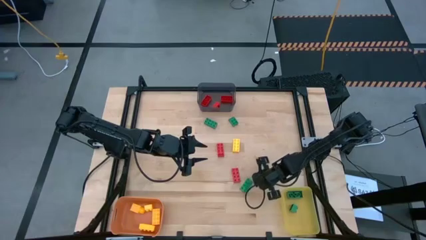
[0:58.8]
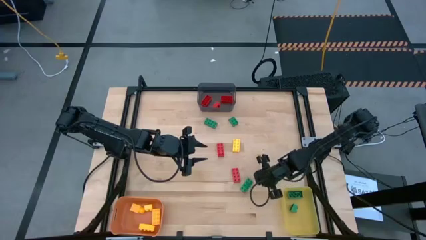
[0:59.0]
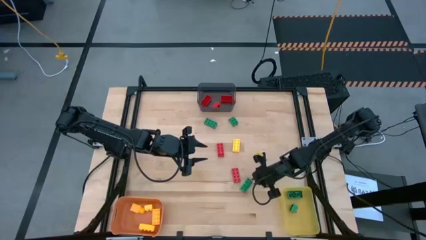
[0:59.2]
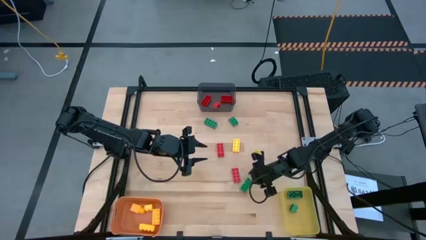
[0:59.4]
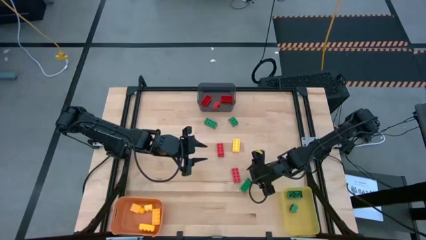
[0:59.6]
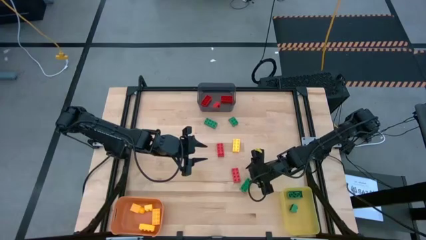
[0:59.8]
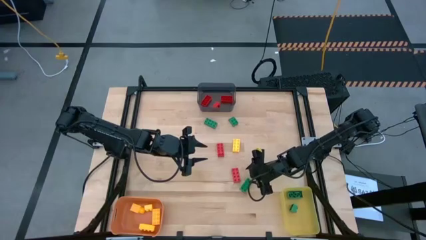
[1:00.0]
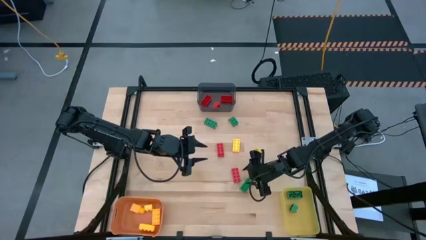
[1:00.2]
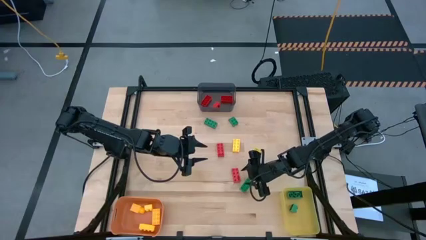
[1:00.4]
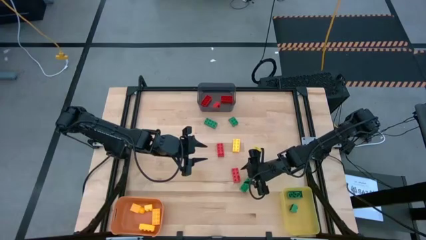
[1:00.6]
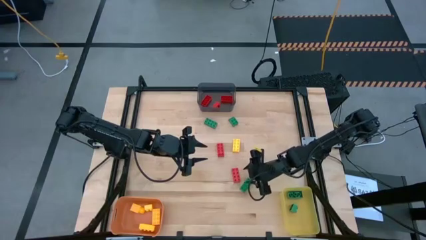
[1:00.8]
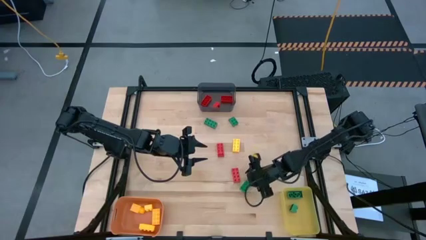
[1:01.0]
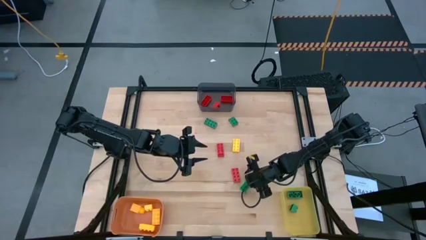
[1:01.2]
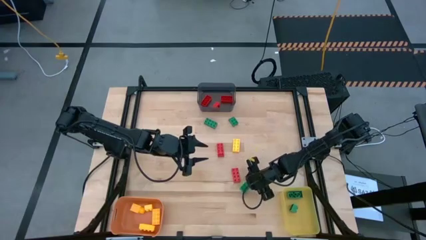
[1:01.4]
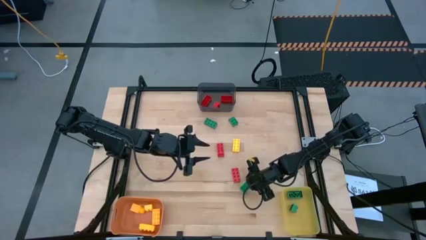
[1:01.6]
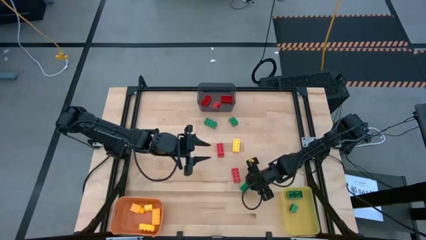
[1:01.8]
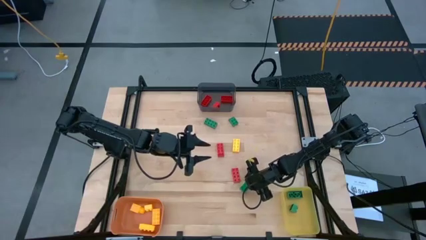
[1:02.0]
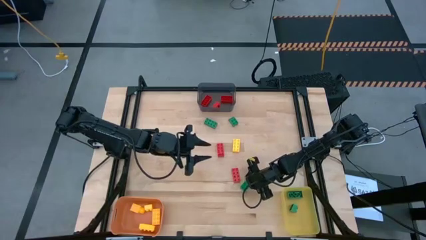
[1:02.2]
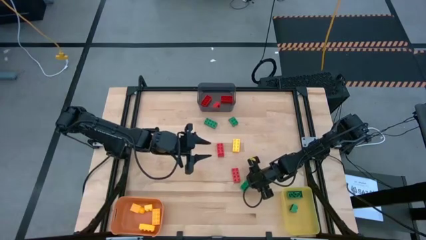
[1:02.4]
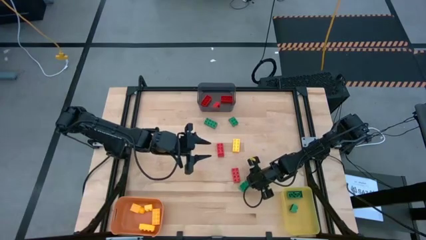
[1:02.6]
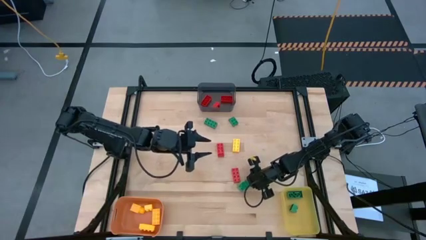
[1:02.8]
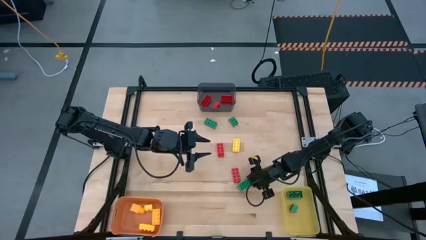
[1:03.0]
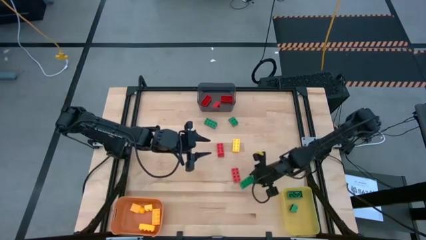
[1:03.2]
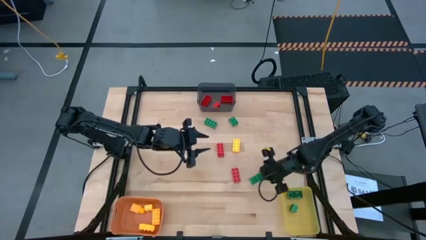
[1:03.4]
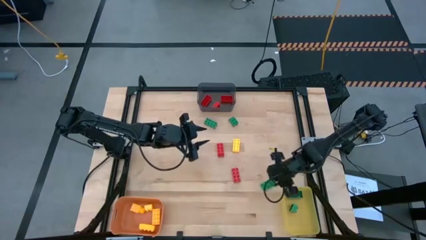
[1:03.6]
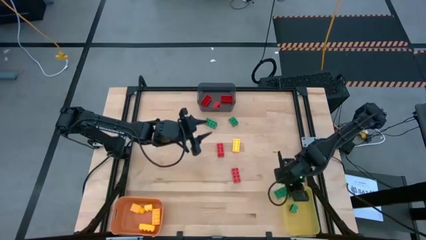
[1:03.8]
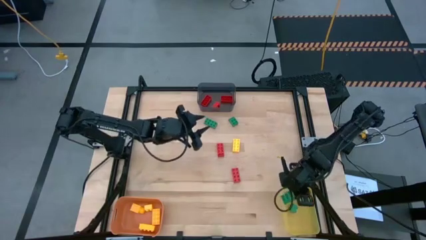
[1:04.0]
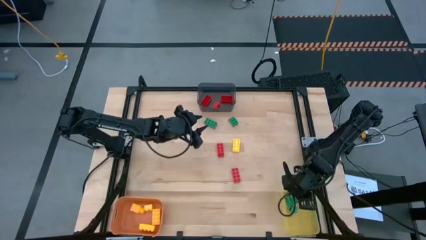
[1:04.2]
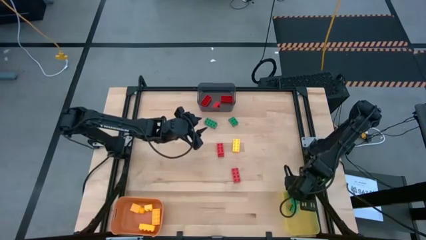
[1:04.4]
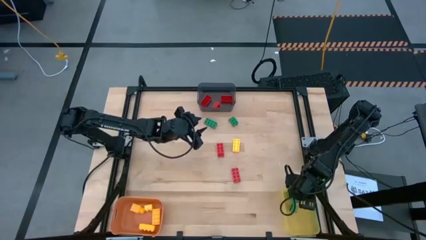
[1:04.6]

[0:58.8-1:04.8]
Task: Sort & place blocks by color
Put the green game piece into the yellow bin

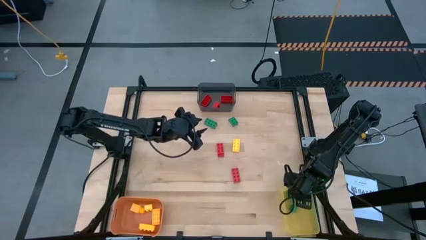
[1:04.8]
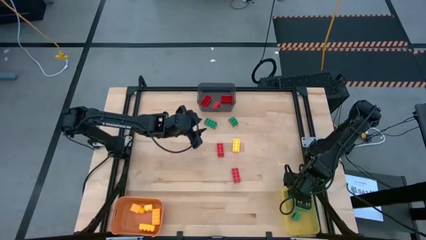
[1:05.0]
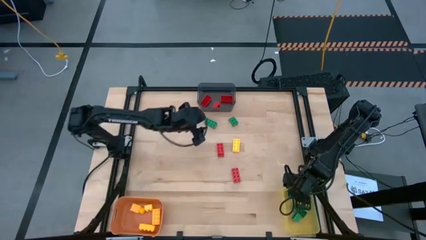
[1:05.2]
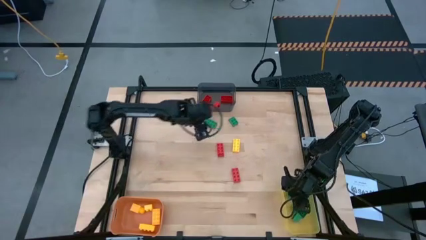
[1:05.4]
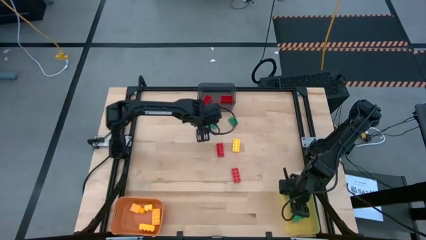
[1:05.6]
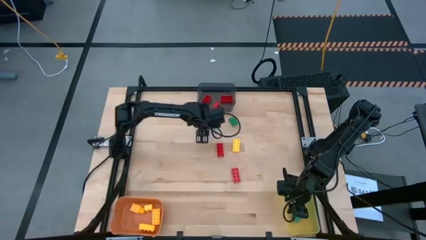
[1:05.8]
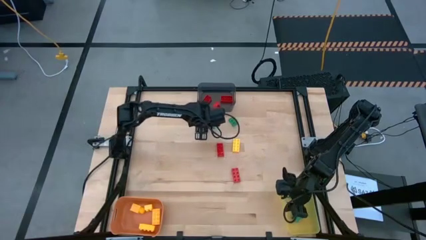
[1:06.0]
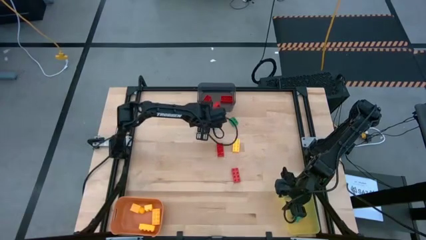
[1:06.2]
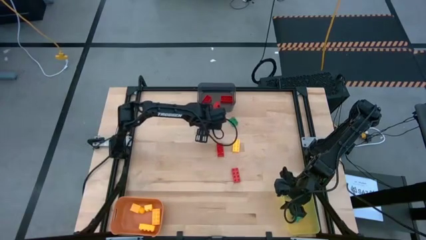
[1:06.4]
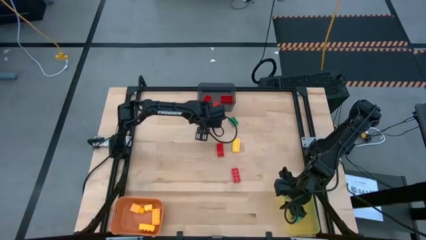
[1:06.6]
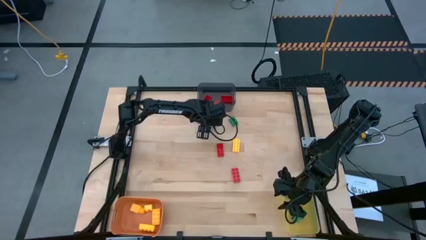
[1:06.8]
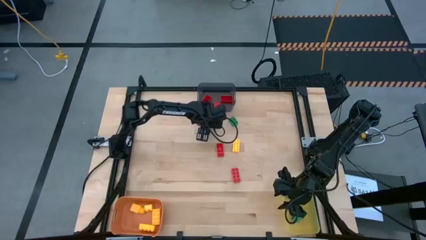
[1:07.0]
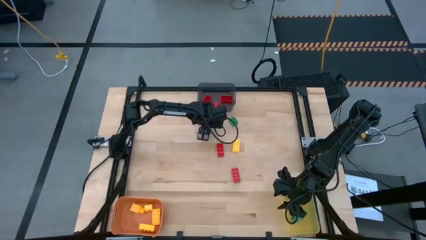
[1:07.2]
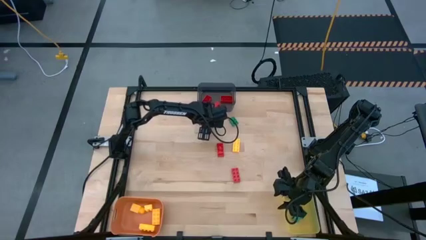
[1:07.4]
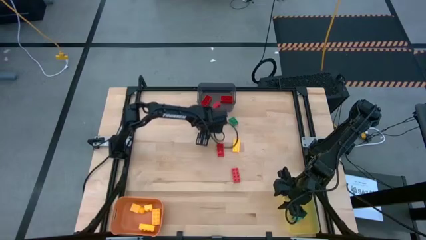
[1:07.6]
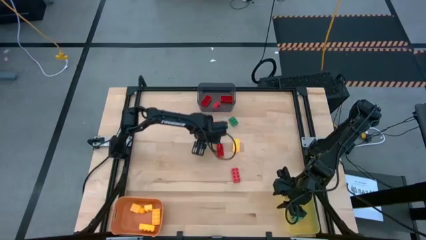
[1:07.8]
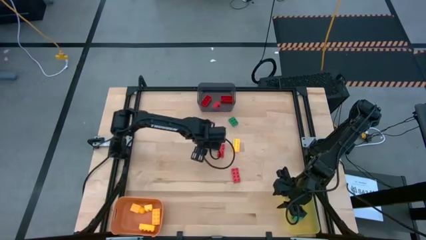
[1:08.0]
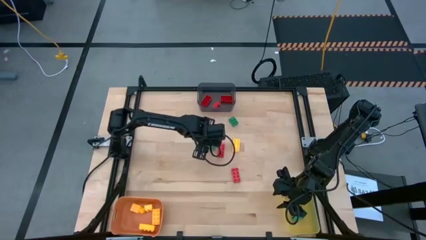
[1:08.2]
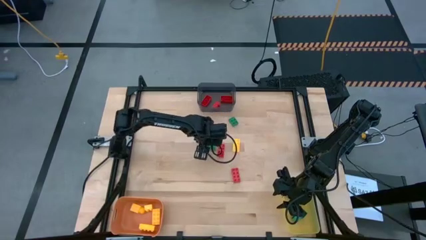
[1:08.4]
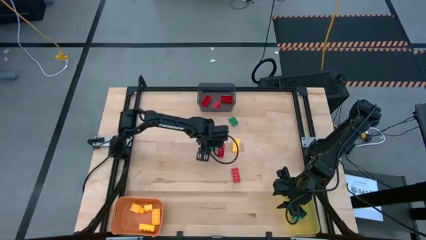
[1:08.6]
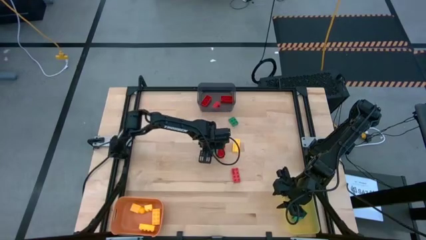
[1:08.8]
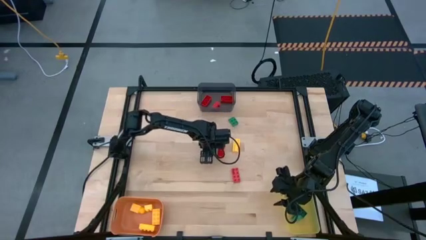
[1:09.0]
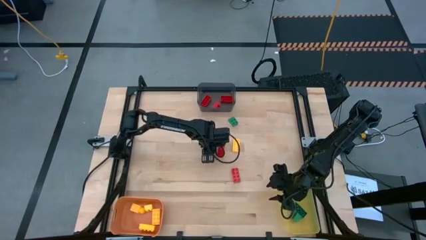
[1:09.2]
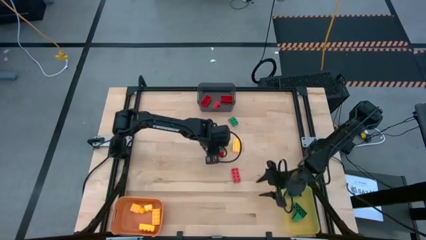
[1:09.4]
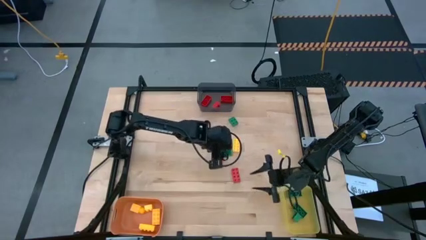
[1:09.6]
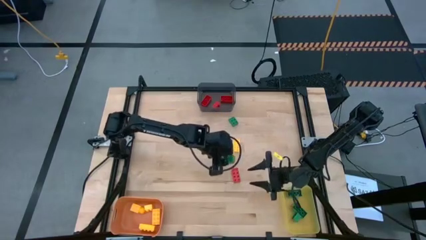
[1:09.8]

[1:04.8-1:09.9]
Put the green game piece into the yellow bin

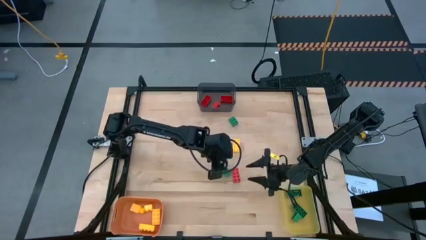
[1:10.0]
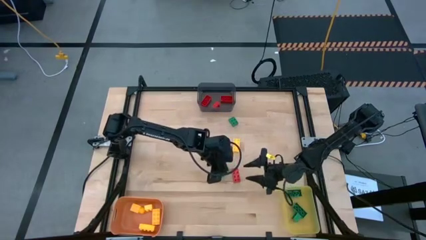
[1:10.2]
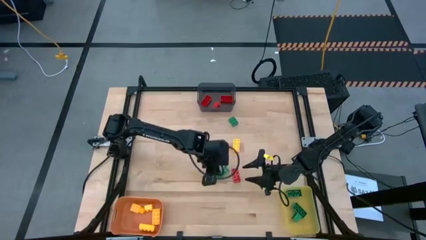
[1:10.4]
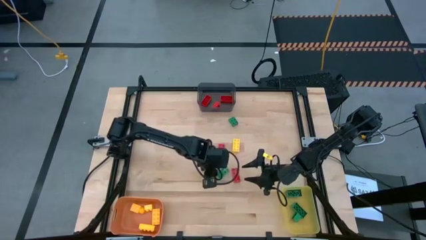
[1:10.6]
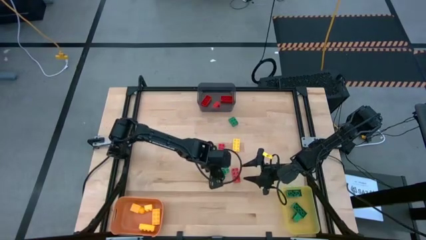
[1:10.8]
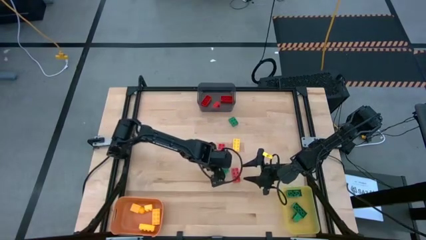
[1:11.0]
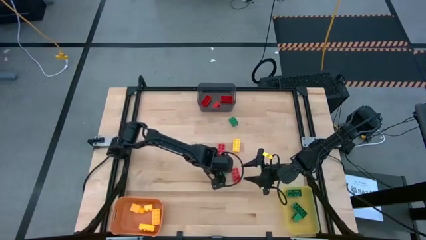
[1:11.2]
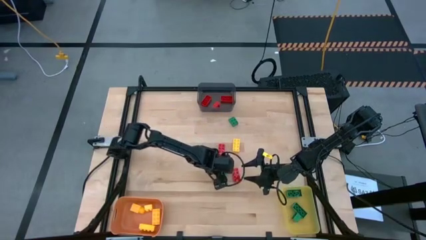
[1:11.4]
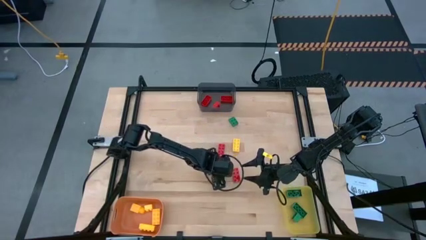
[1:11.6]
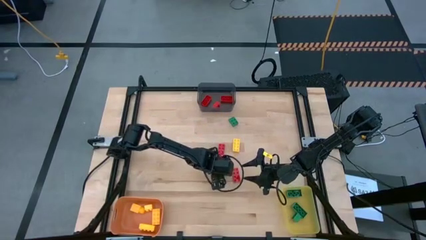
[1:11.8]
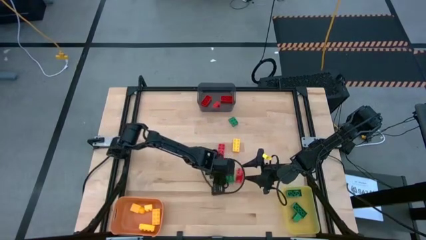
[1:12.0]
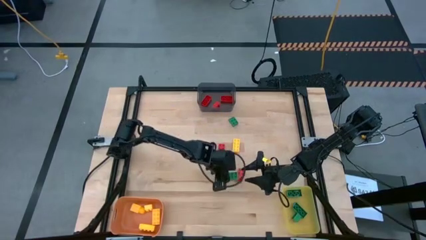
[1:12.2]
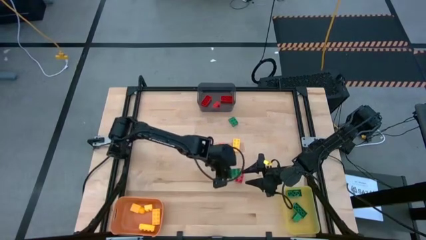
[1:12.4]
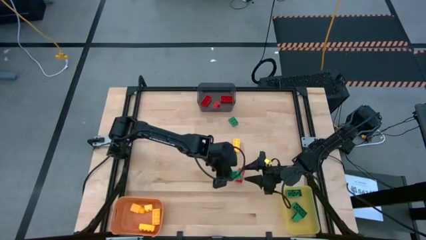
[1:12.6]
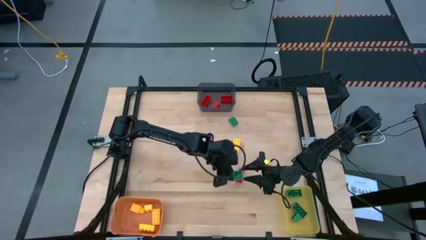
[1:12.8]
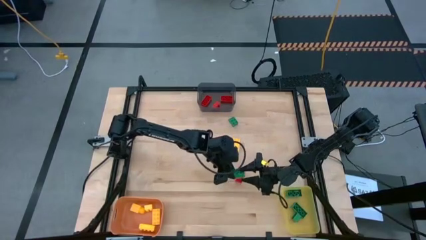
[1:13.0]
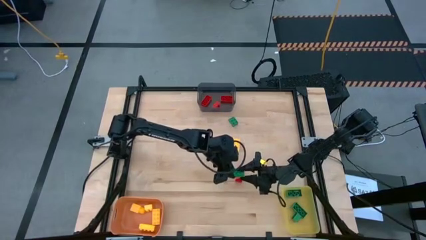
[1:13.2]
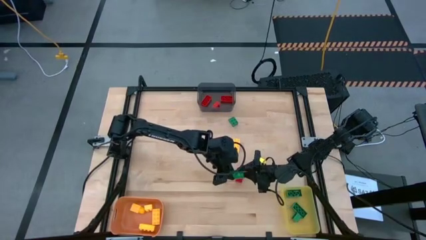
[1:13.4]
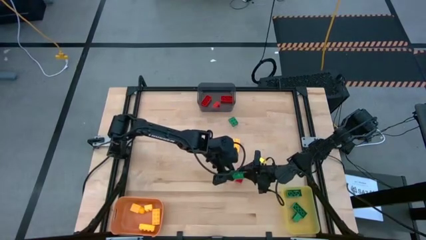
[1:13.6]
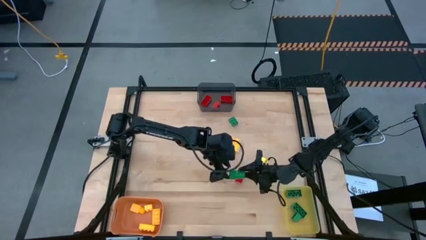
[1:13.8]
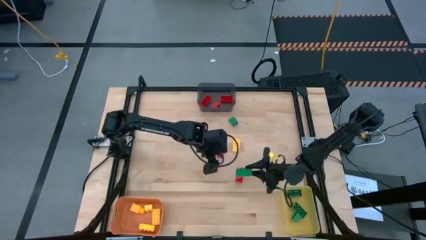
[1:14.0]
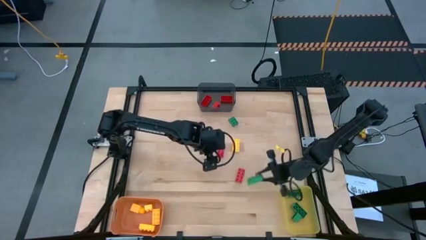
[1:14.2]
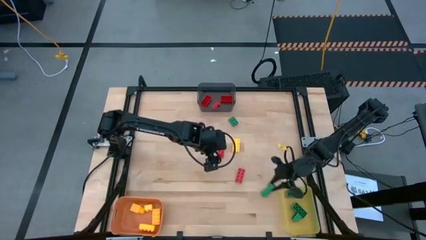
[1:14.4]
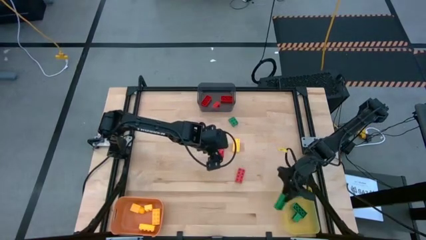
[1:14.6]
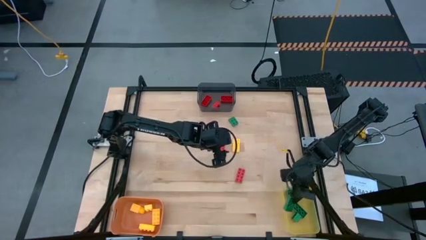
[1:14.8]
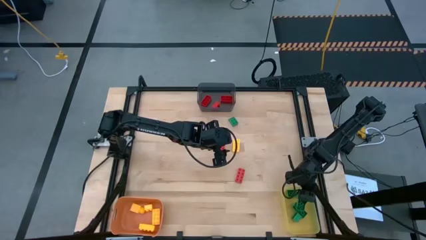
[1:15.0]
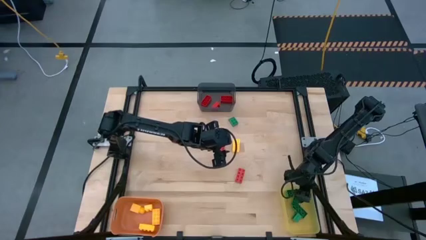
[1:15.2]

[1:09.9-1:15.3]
Put the green game piece into the yellow bin
